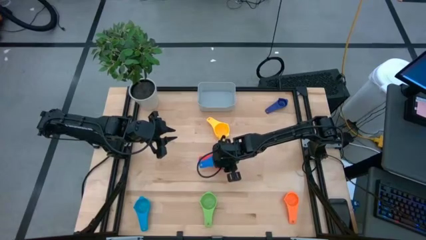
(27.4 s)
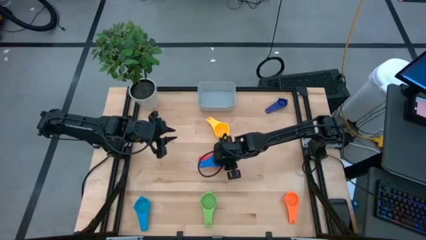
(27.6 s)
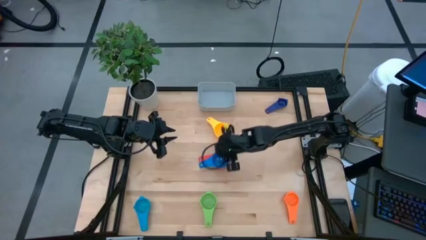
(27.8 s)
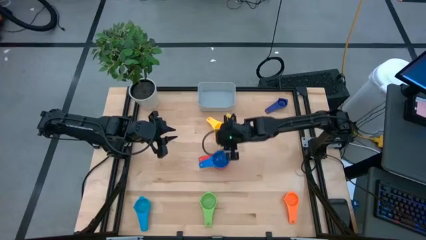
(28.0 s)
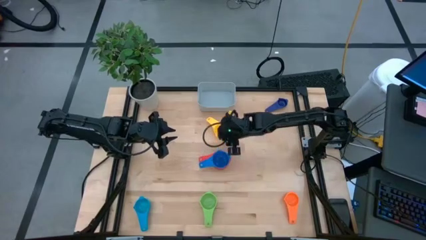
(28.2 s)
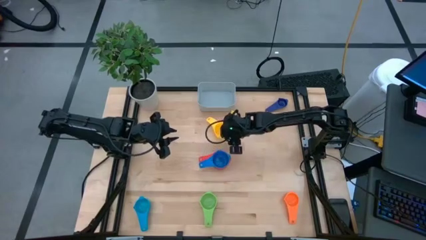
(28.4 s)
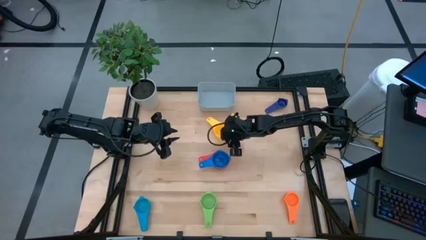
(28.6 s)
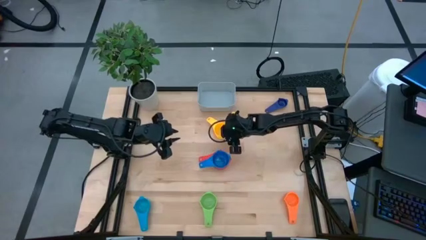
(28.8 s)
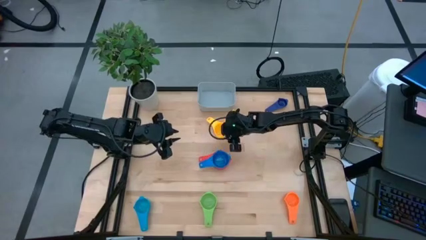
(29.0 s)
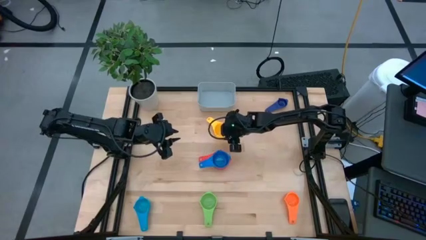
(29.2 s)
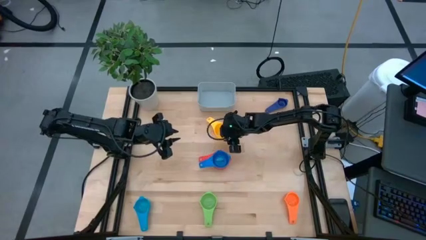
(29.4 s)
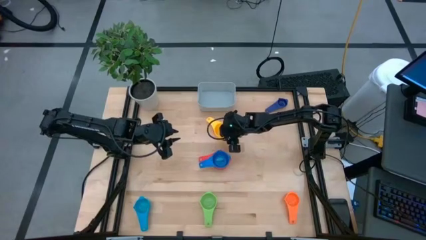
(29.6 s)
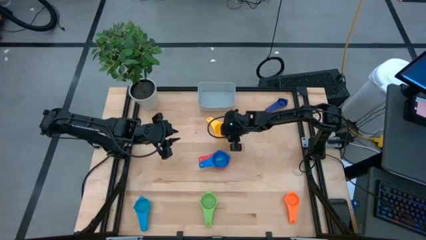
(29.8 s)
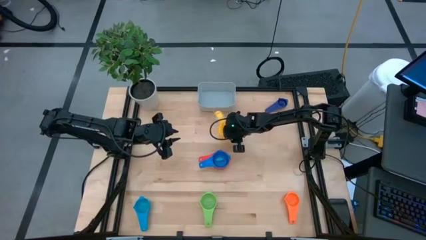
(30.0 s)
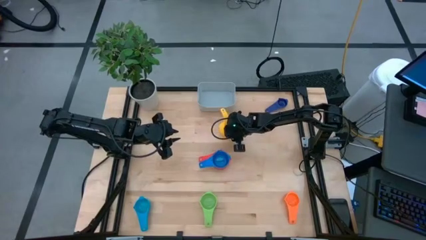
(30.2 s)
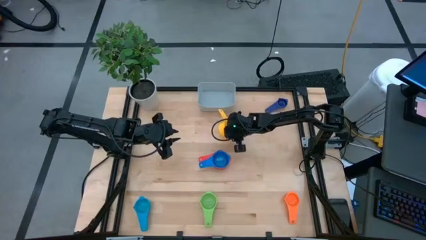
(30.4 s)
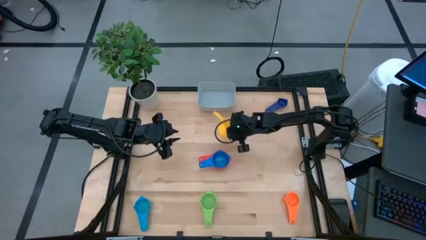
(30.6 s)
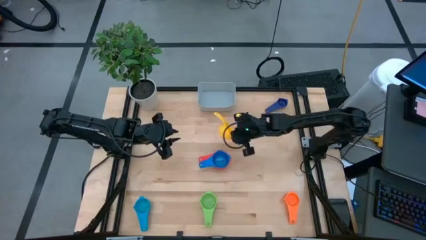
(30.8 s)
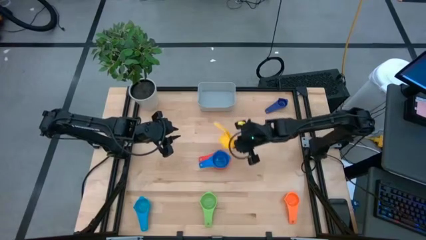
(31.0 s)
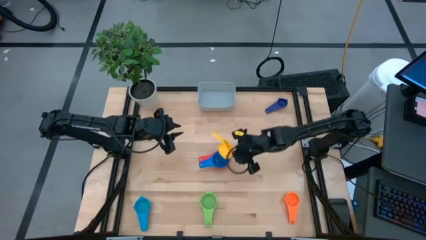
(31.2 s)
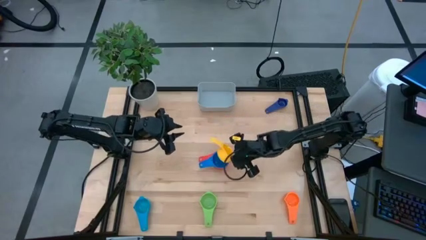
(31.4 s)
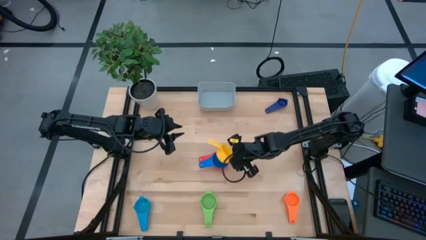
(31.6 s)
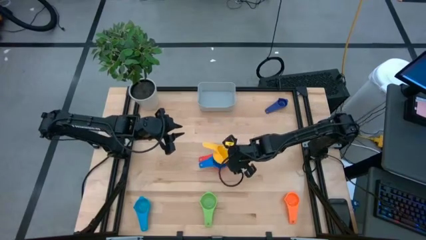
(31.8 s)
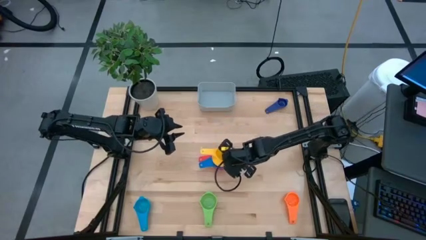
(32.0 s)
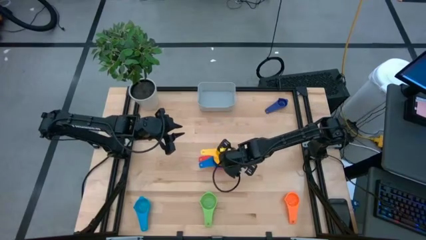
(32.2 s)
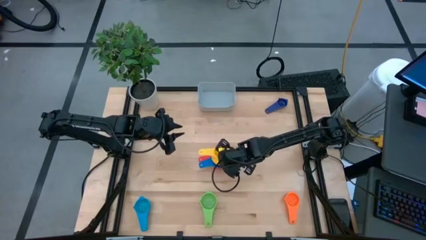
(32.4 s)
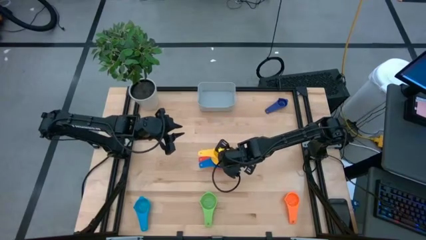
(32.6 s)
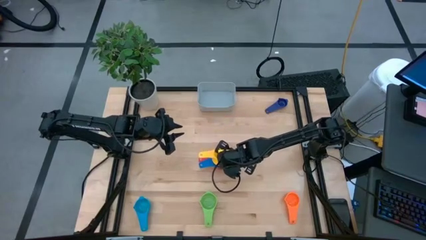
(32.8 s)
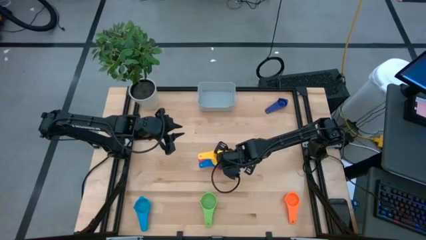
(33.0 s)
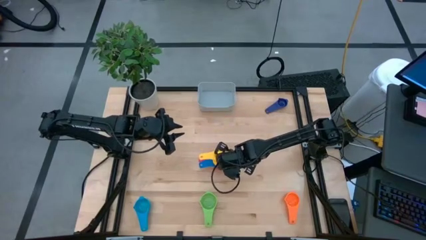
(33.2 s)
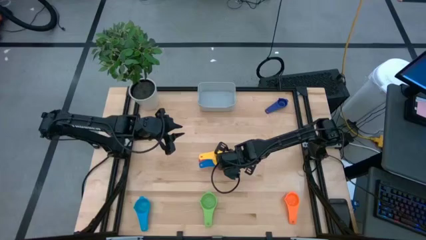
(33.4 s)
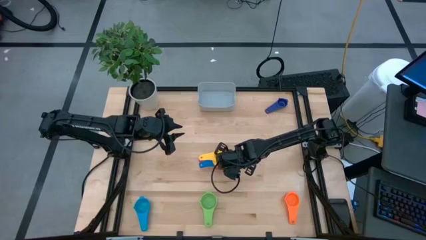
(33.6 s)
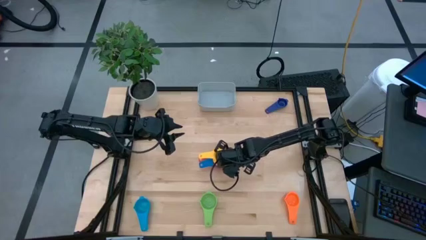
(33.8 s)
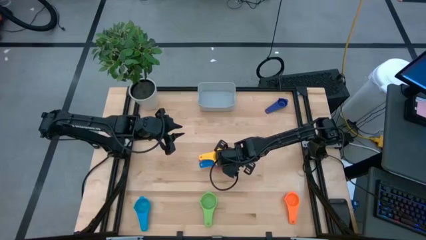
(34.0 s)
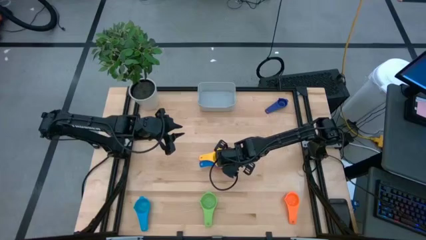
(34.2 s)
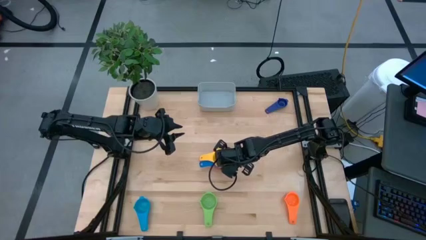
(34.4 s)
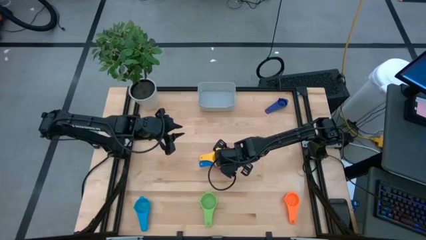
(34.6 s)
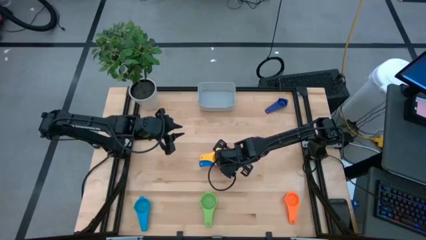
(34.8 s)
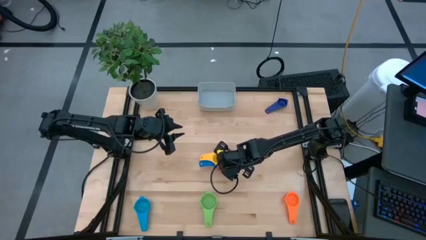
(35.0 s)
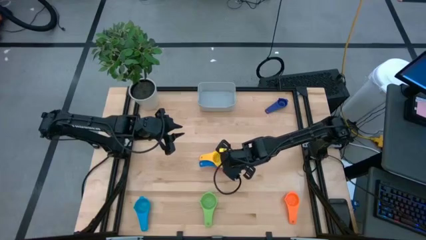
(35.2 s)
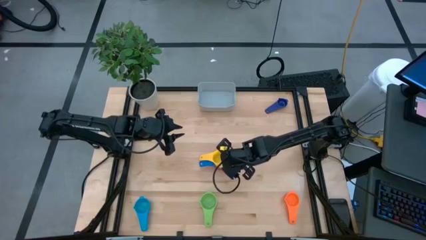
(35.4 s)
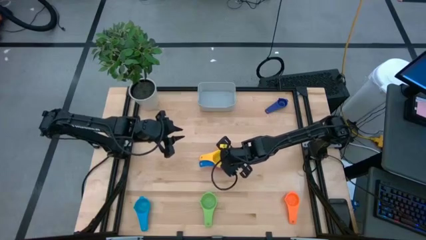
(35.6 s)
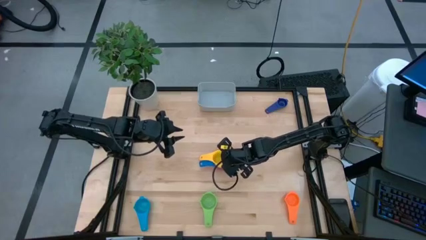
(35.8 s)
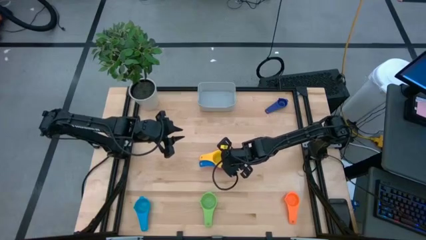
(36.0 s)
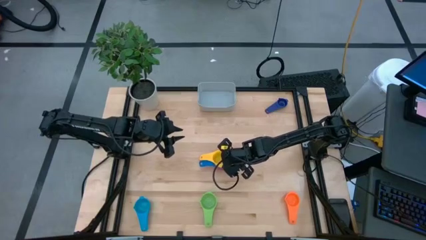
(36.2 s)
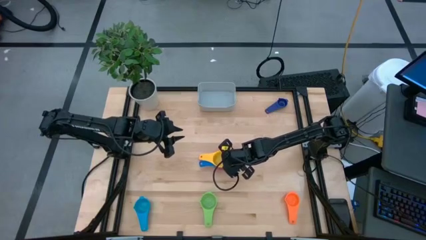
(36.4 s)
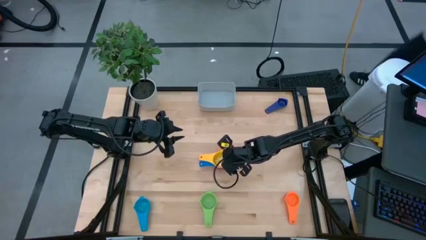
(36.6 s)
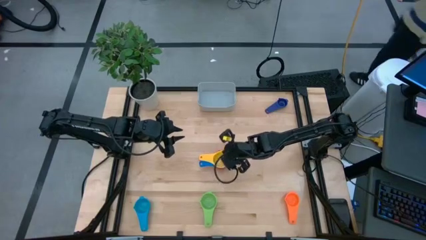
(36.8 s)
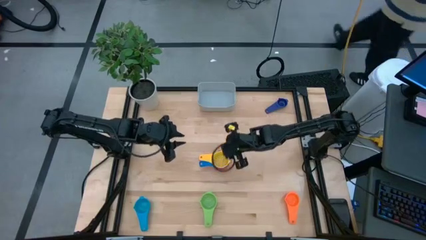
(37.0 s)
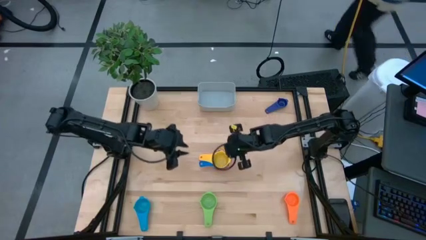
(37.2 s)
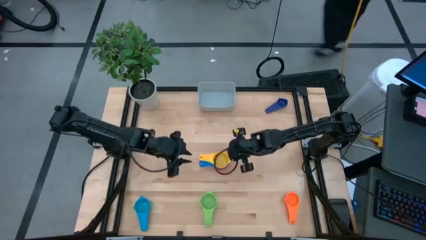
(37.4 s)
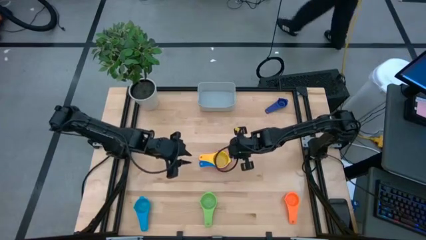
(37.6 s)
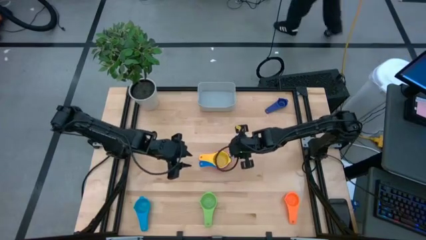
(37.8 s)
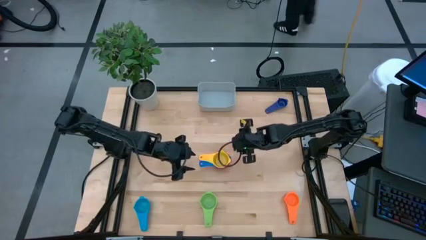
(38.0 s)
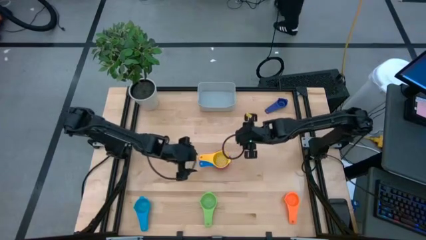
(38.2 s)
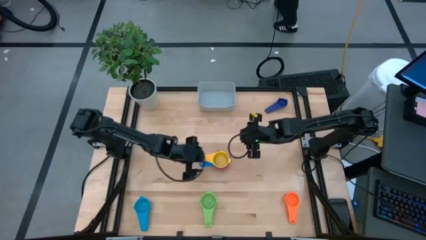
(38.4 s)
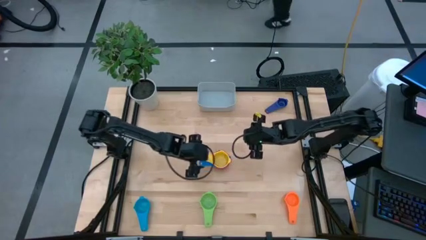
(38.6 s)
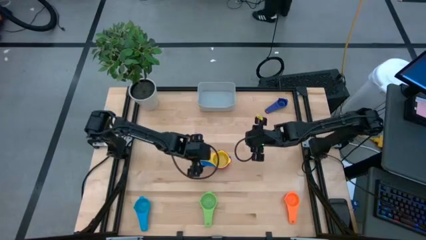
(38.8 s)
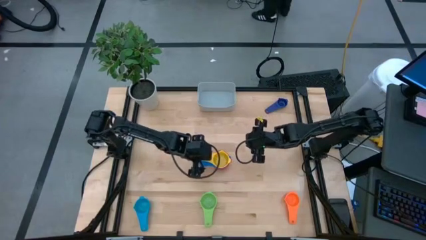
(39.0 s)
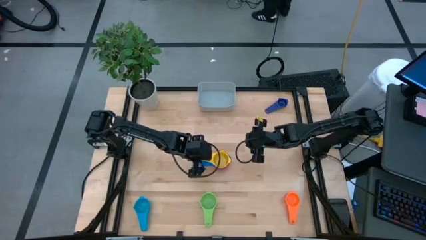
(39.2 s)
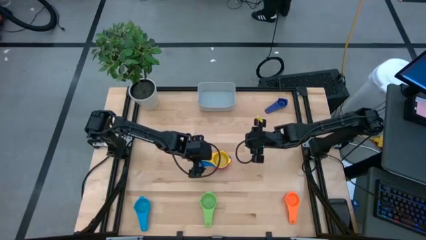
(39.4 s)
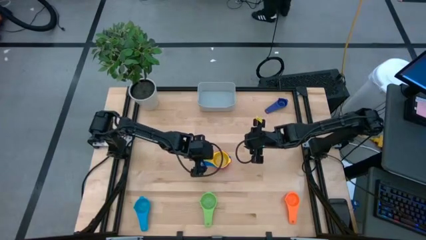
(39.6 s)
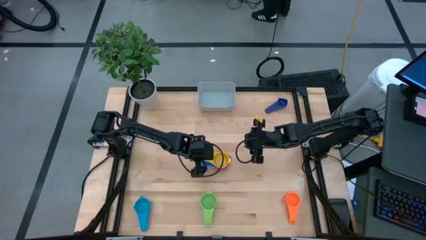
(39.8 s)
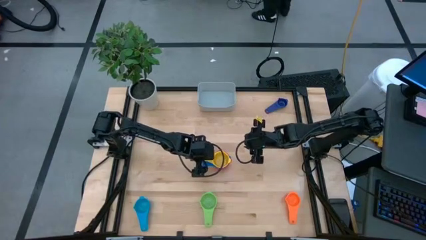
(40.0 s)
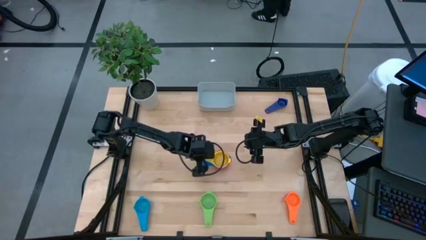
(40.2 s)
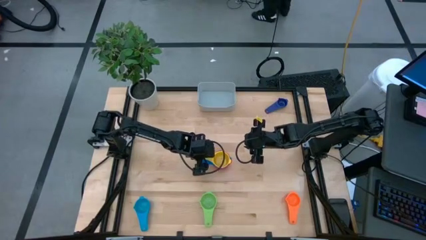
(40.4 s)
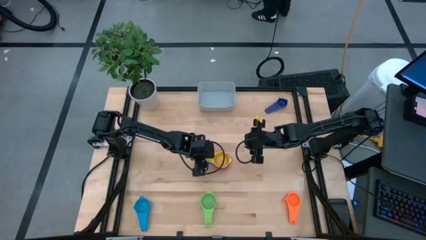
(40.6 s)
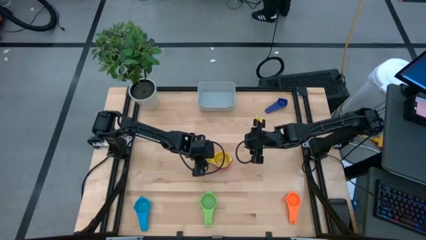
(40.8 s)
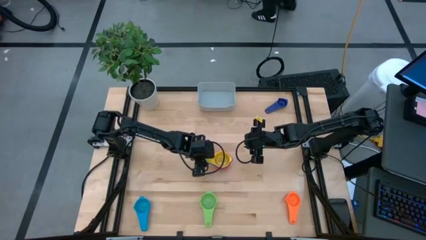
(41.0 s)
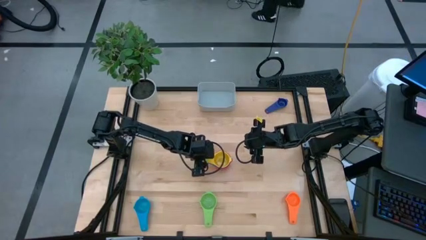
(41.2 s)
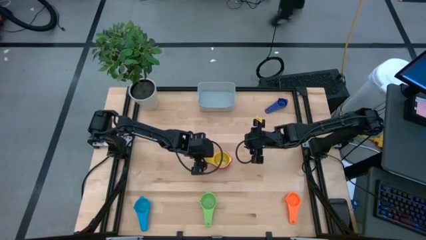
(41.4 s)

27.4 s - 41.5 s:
Task: Nest measuring cups in basket
Stack the yellow measuring cup on top of the blue measuring cup
